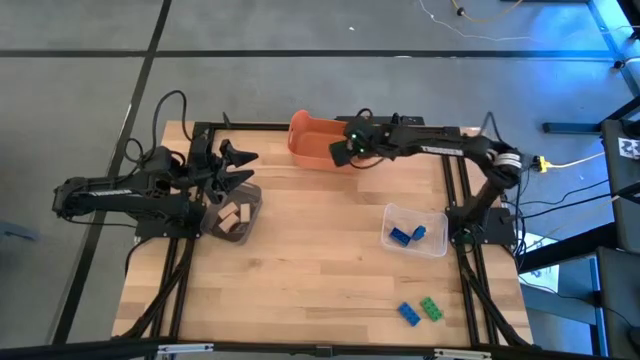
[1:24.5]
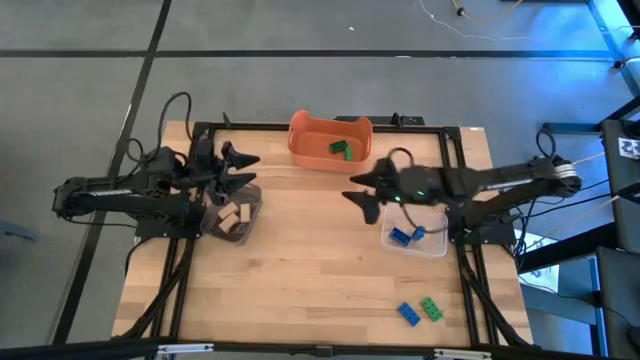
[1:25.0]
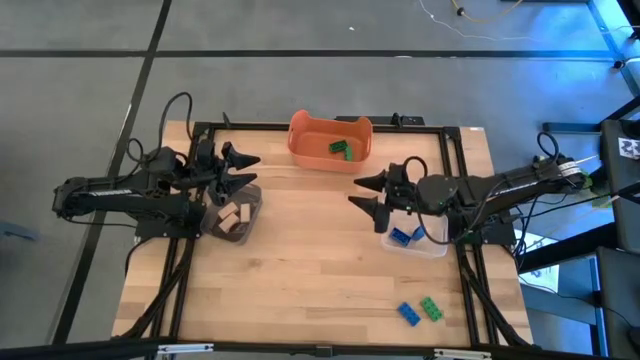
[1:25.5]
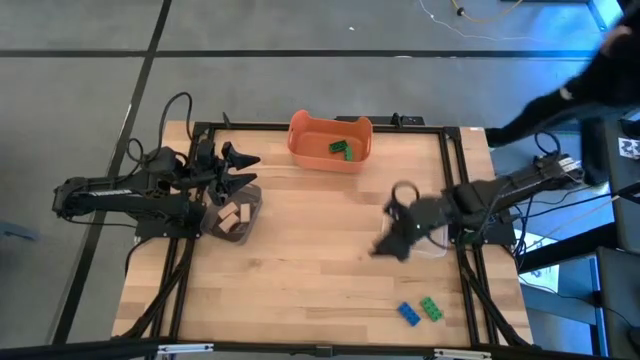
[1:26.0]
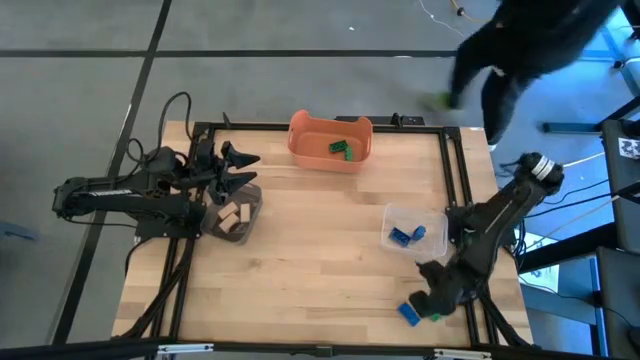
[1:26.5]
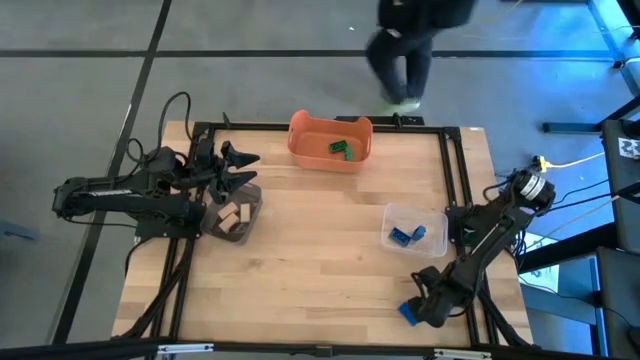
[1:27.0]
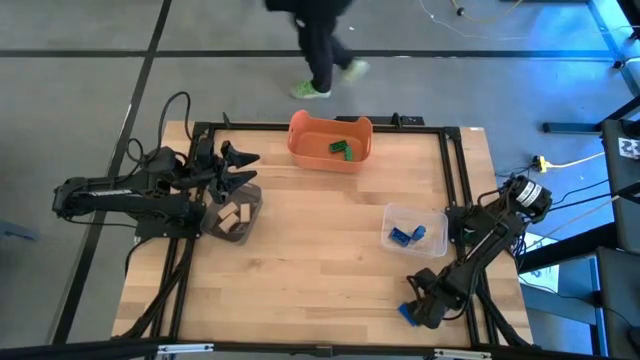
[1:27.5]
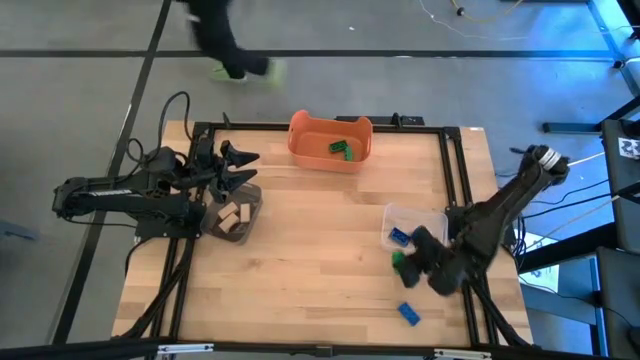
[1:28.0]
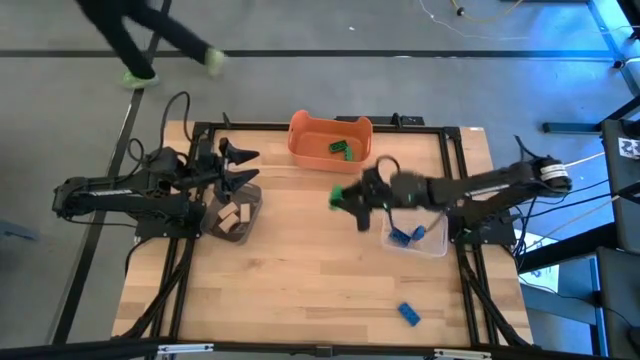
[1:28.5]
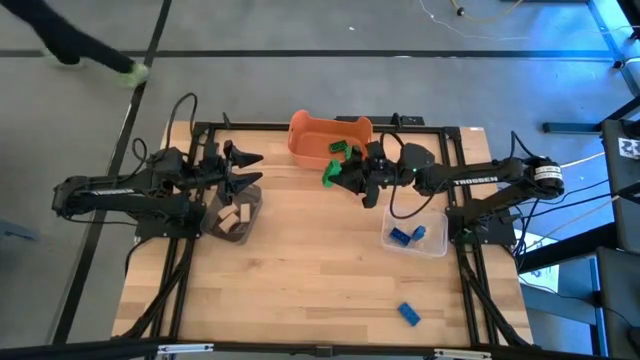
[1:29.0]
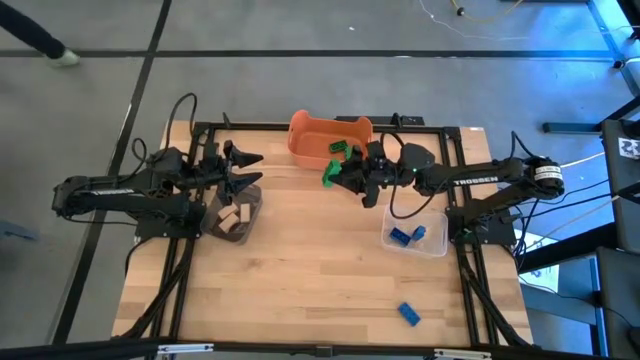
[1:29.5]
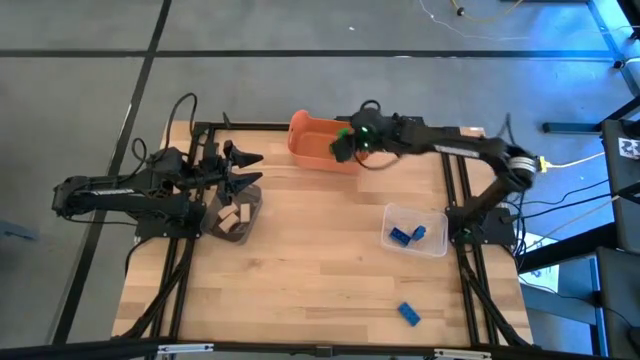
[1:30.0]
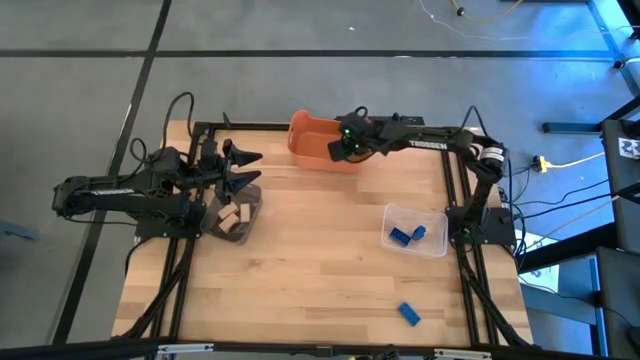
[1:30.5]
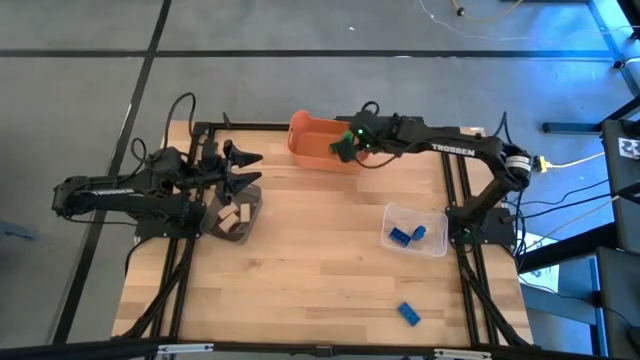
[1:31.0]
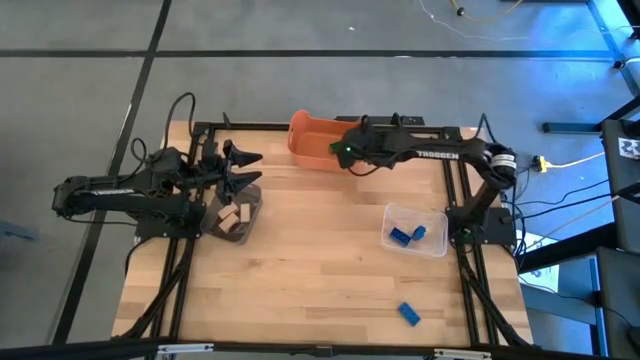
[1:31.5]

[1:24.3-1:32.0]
Task: Sort & place blocks by color
Put the green game piece into the orange bin

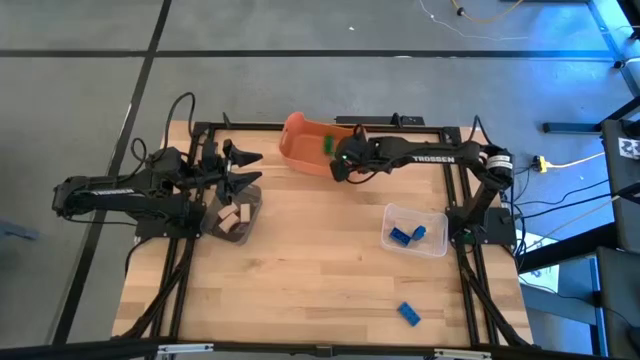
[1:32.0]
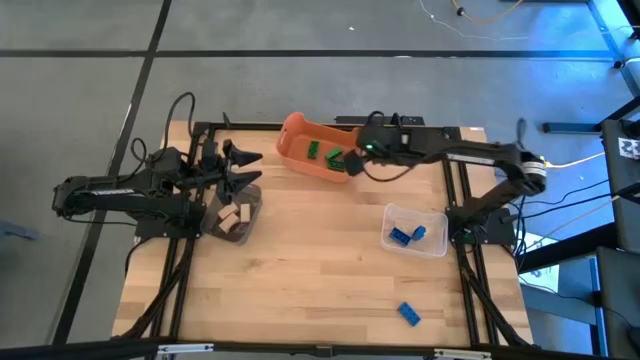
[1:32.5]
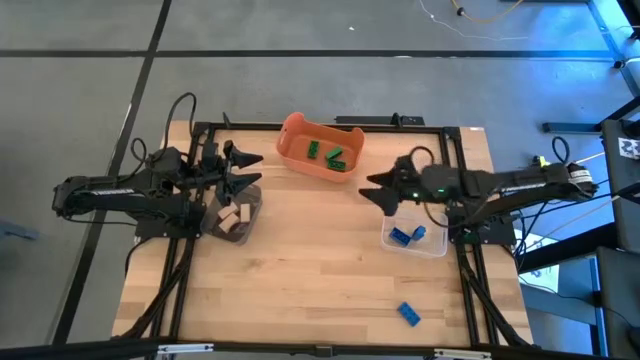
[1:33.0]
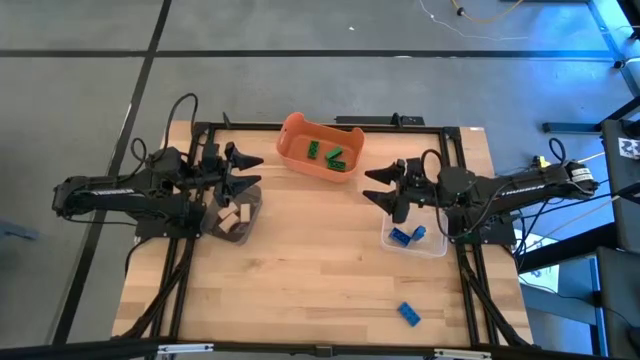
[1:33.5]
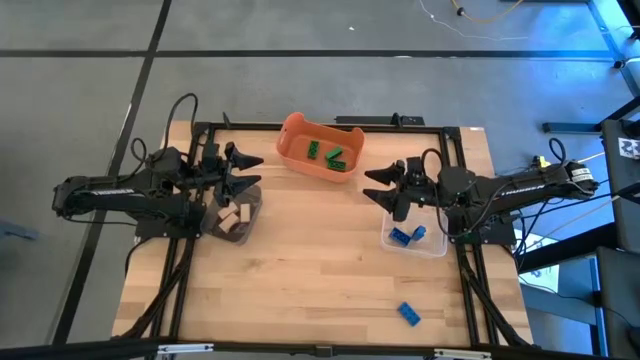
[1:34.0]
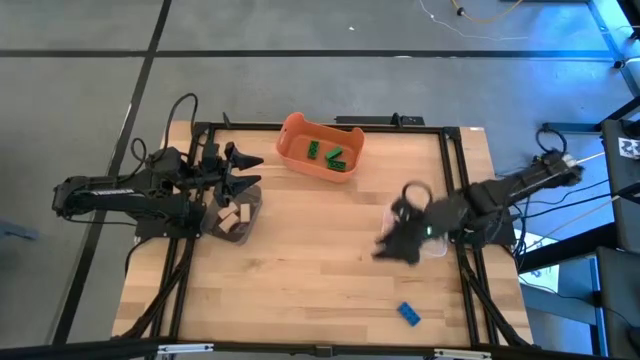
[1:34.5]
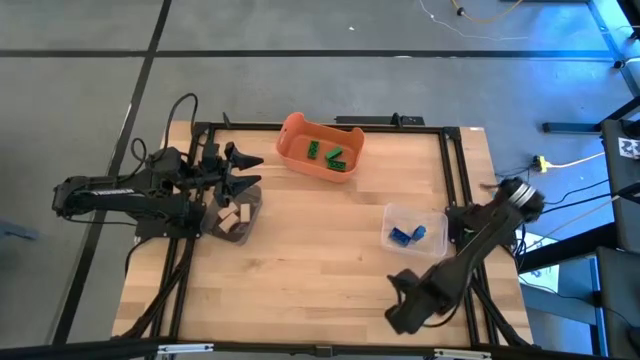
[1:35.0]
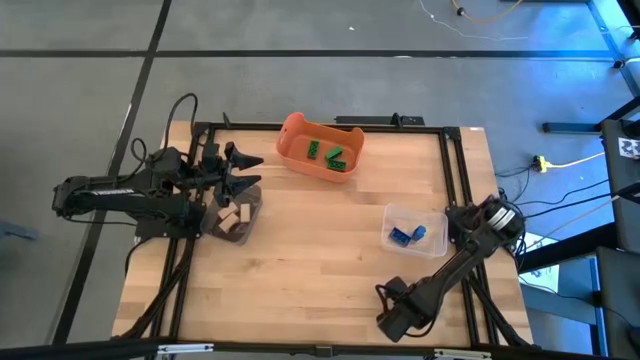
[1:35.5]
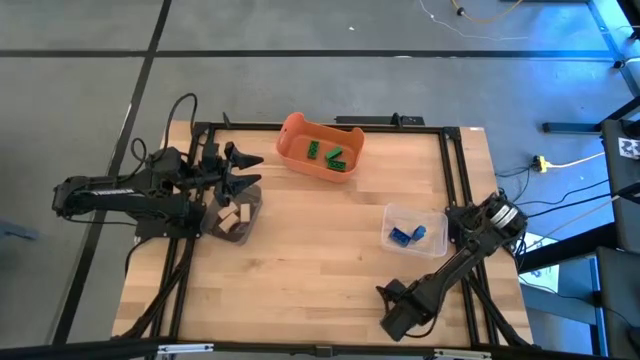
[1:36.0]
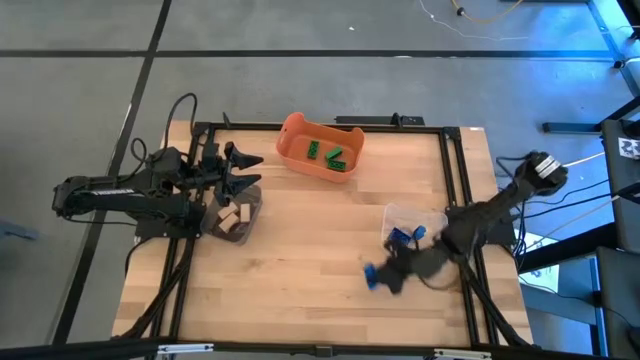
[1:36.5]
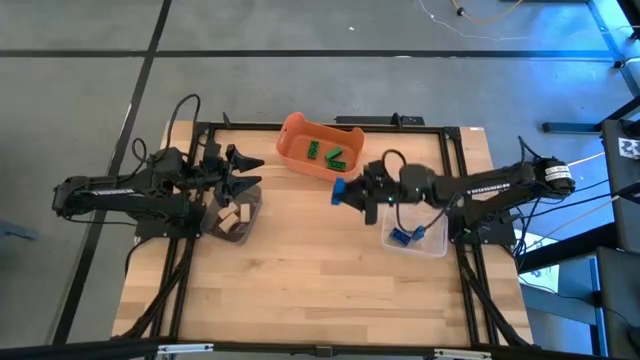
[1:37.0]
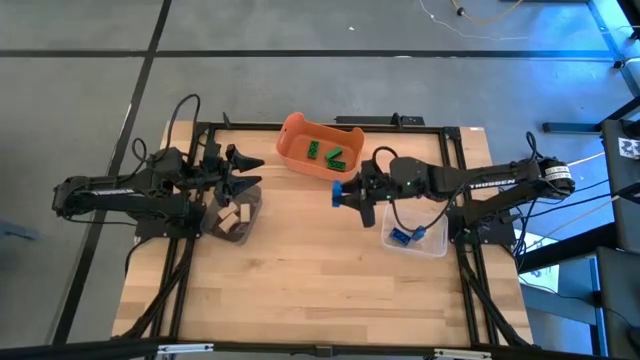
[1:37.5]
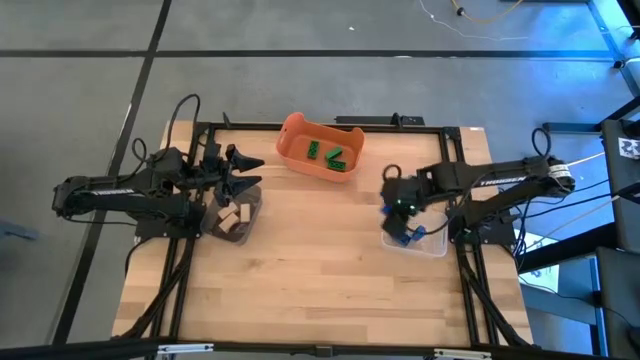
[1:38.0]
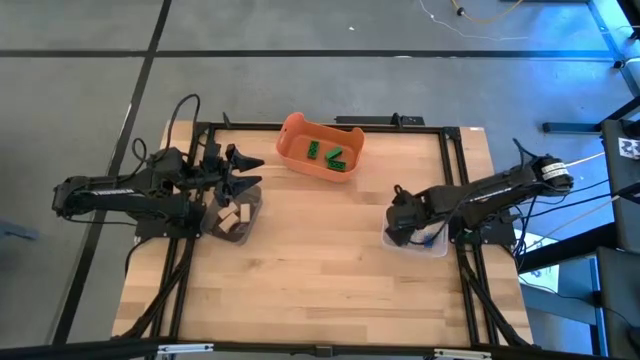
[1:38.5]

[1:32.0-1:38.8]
Put the blue game piece into the transparent bin

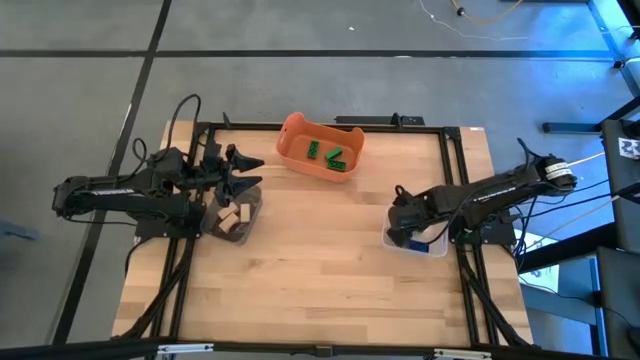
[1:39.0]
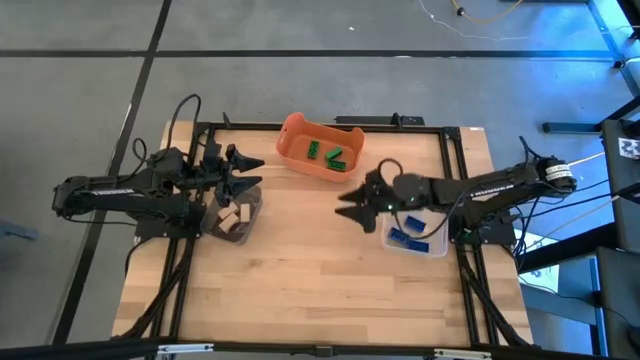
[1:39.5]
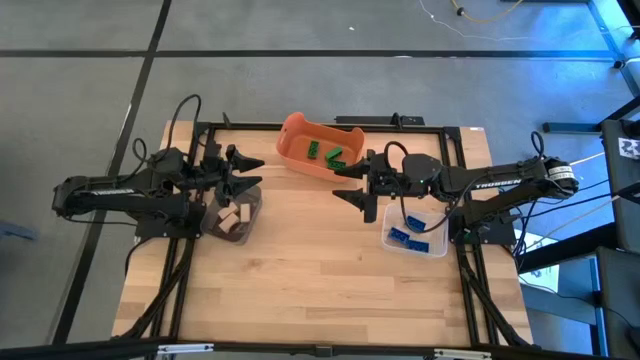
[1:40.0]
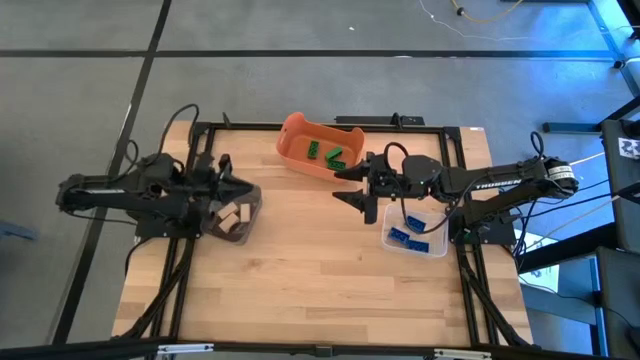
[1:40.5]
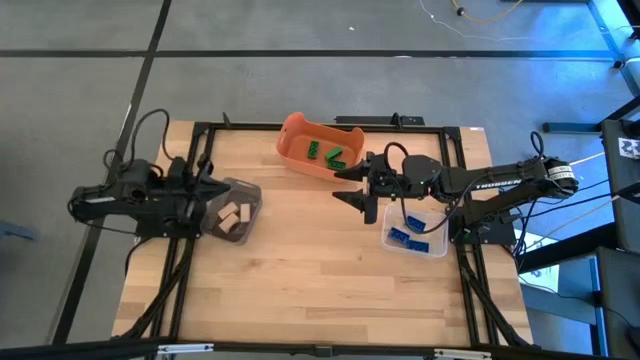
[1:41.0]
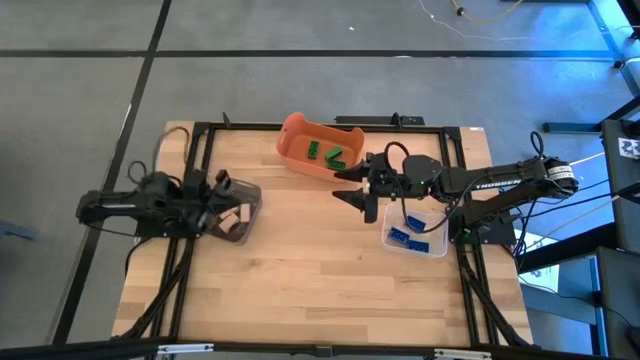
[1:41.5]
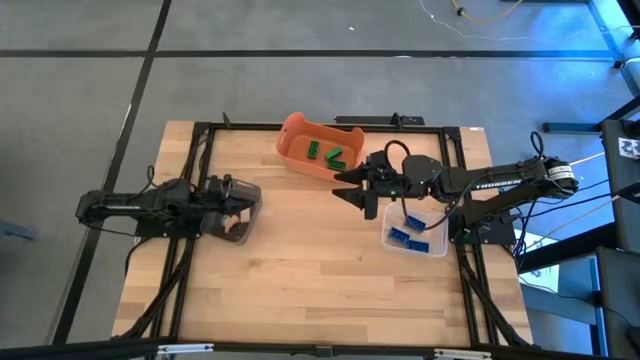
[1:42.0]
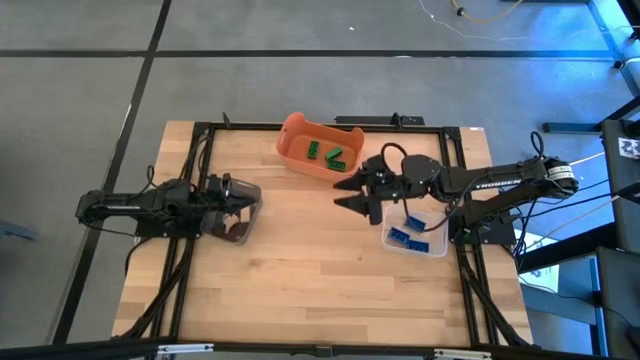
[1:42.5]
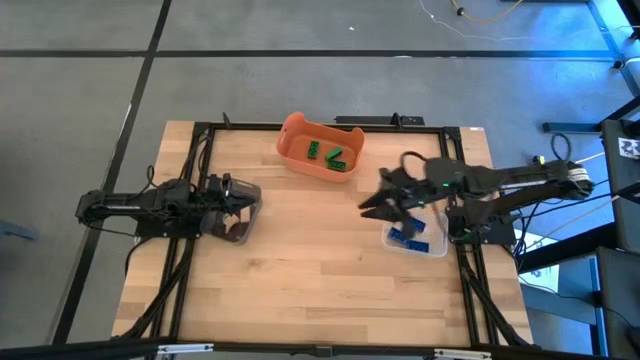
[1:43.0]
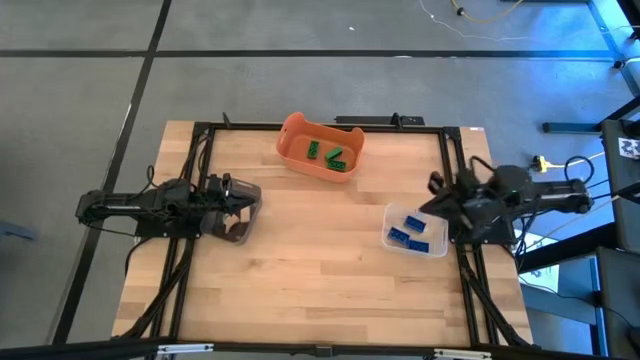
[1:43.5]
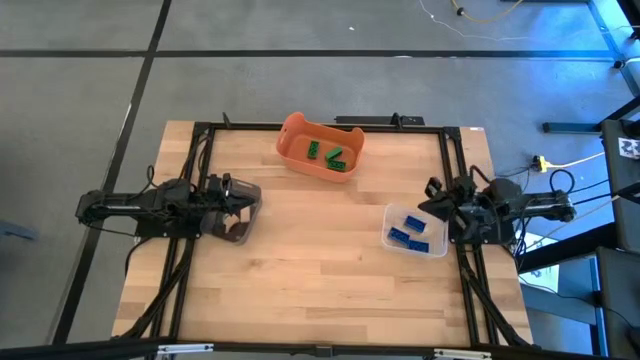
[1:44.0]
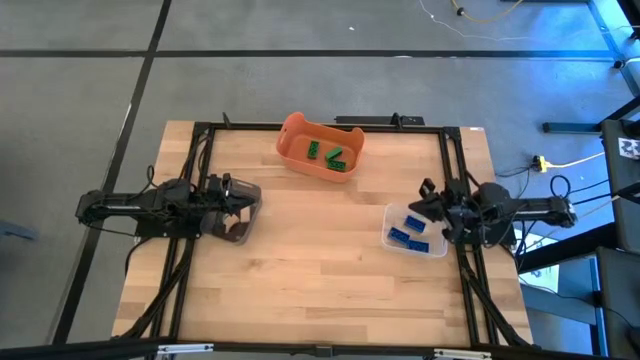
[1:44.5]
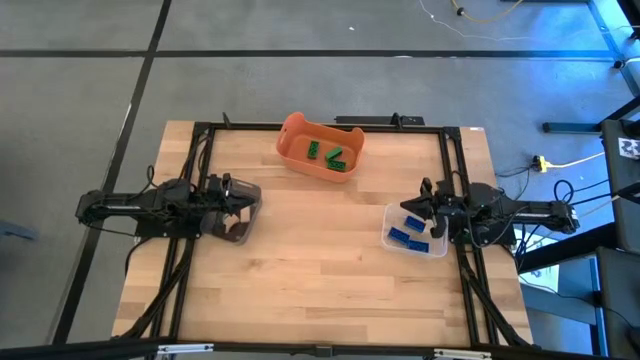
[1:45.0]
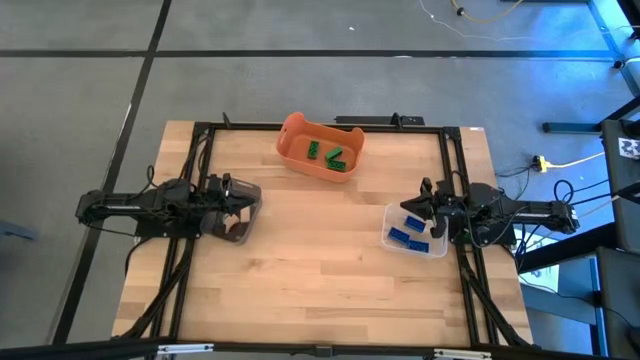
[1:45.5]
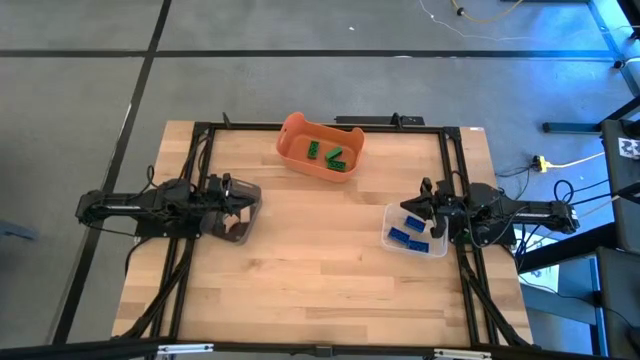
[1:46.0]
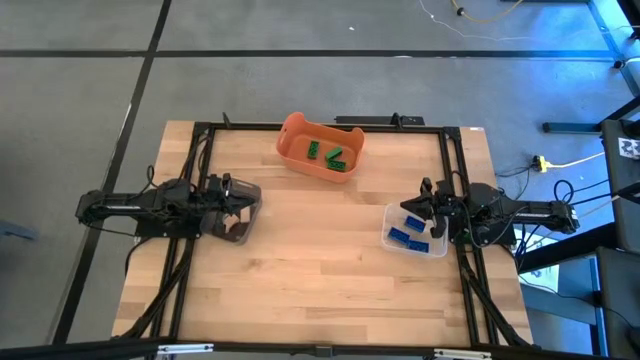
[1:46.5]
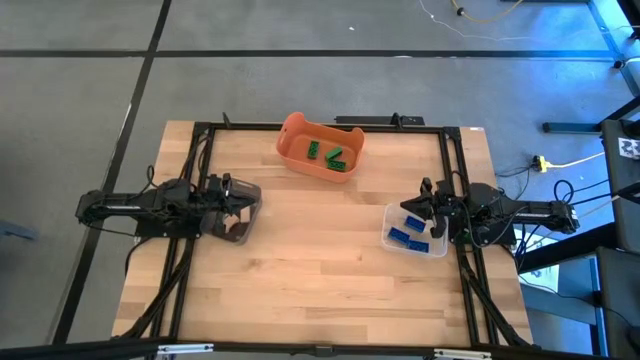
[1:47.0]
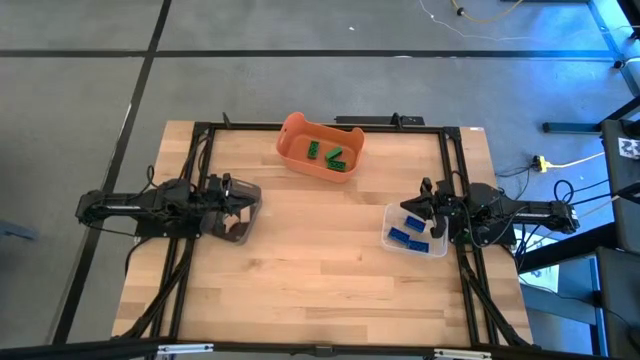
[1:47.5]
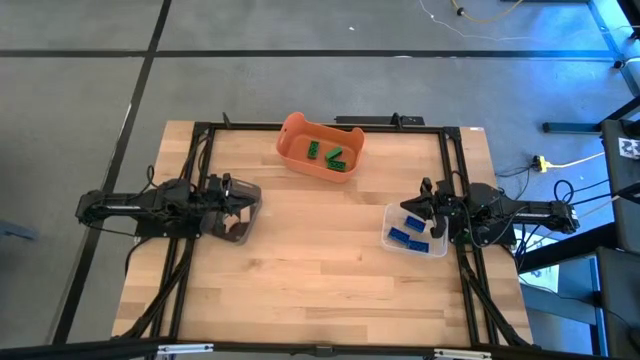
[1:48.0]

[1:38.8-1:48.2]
Return to Home Position
